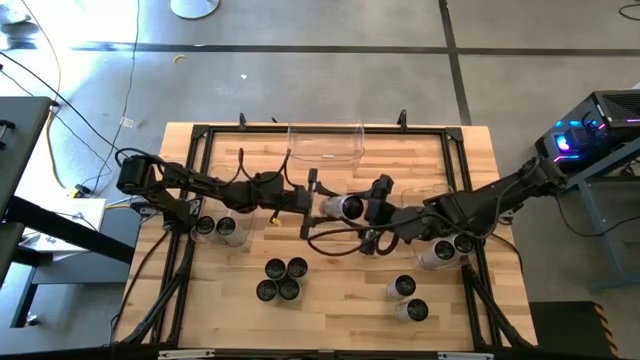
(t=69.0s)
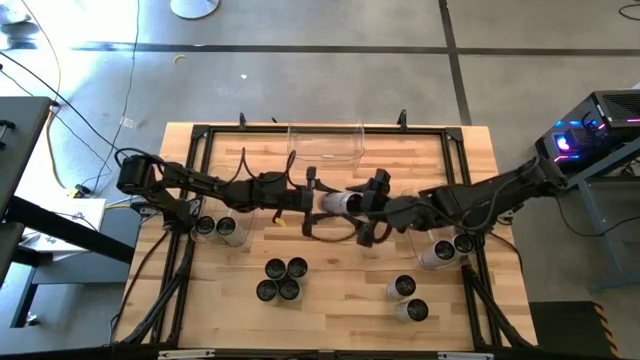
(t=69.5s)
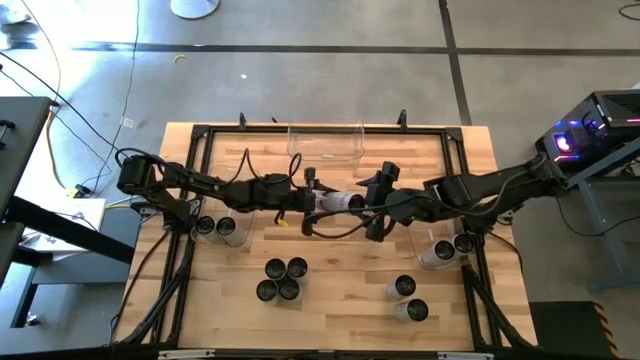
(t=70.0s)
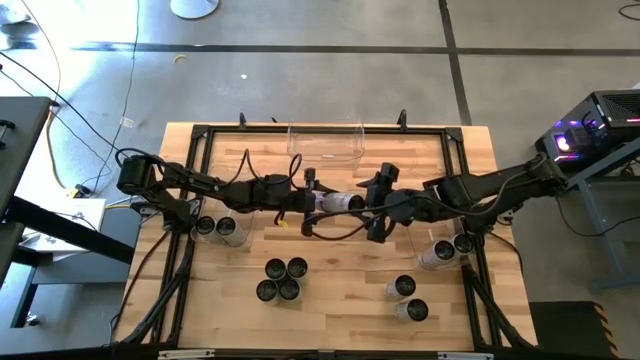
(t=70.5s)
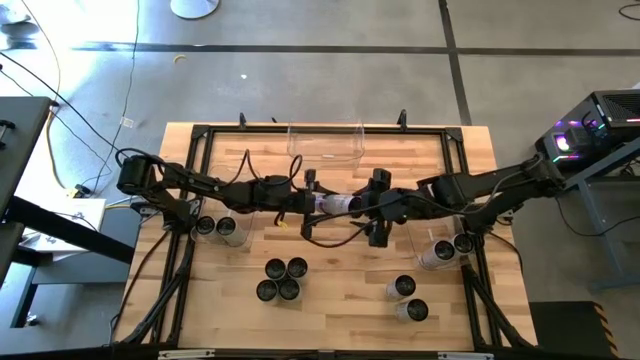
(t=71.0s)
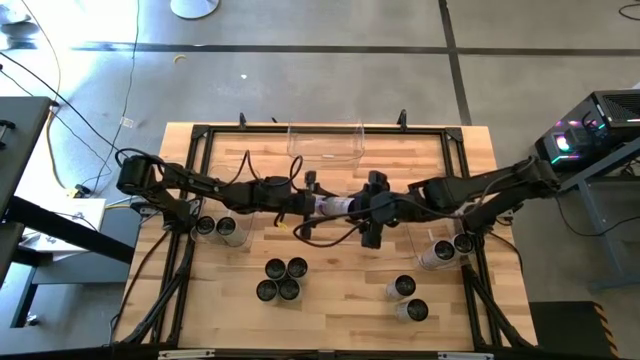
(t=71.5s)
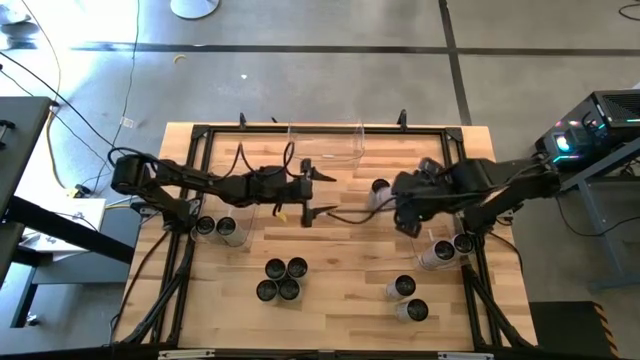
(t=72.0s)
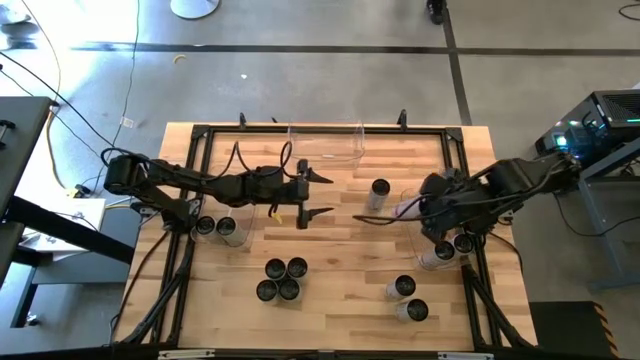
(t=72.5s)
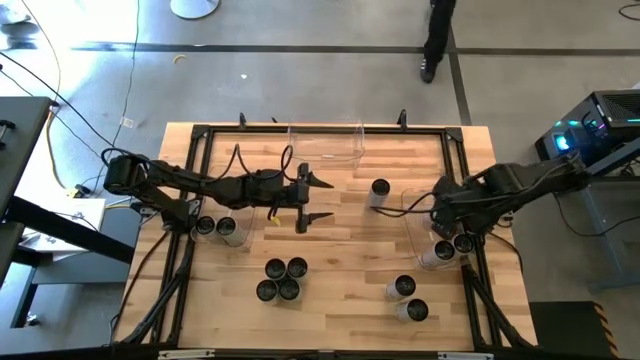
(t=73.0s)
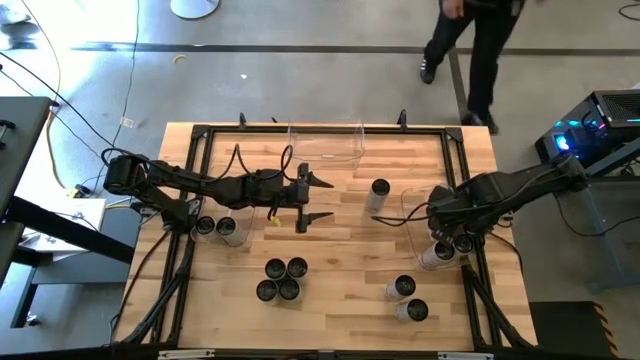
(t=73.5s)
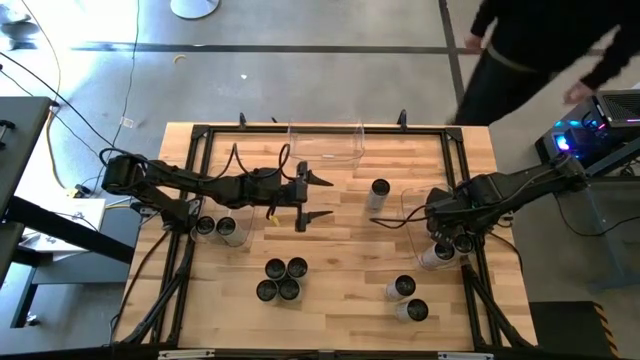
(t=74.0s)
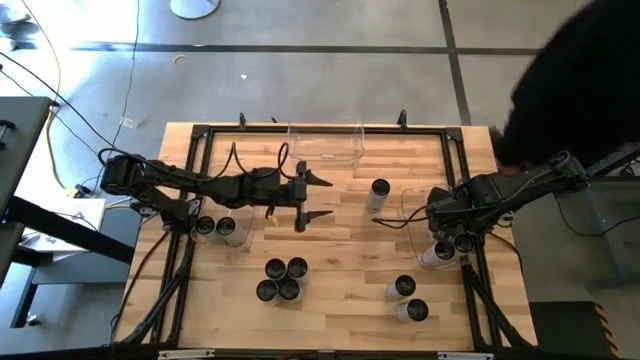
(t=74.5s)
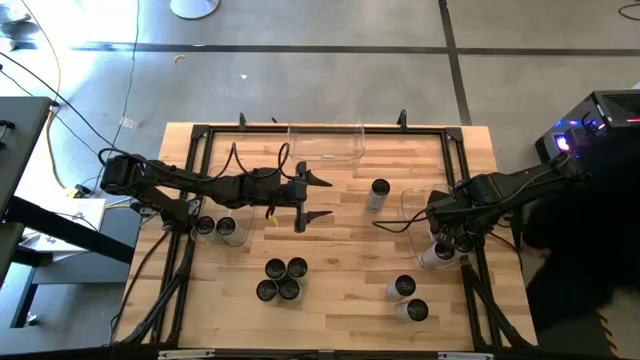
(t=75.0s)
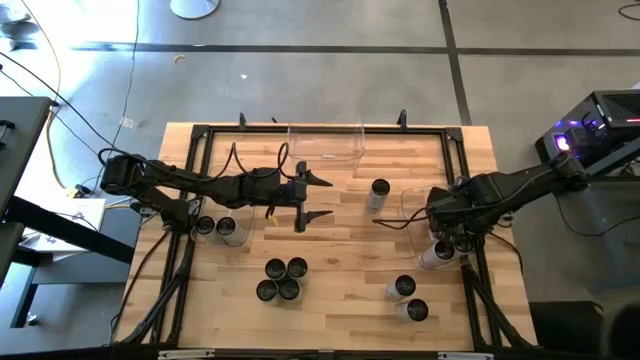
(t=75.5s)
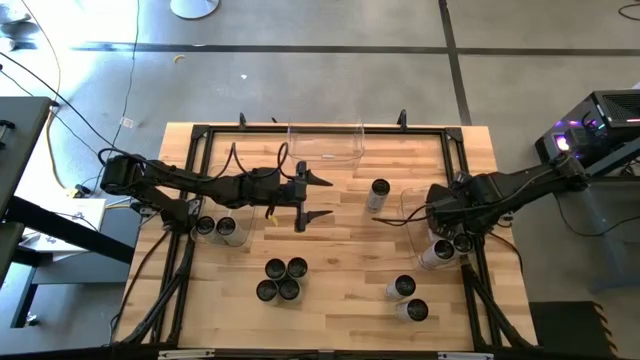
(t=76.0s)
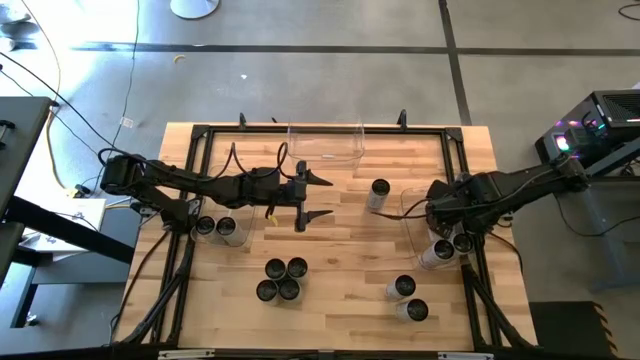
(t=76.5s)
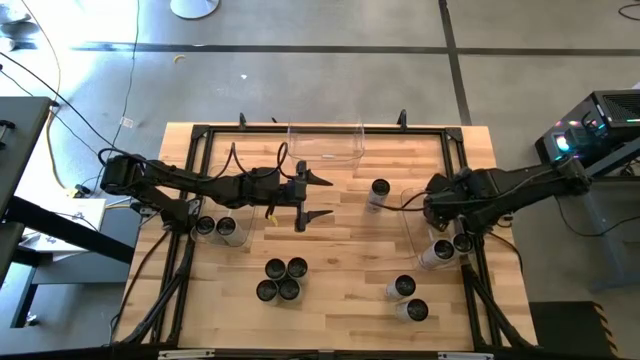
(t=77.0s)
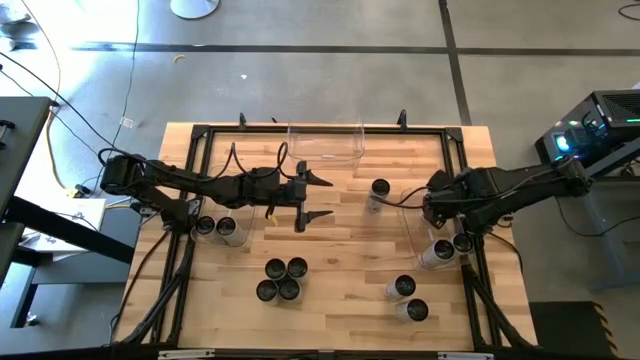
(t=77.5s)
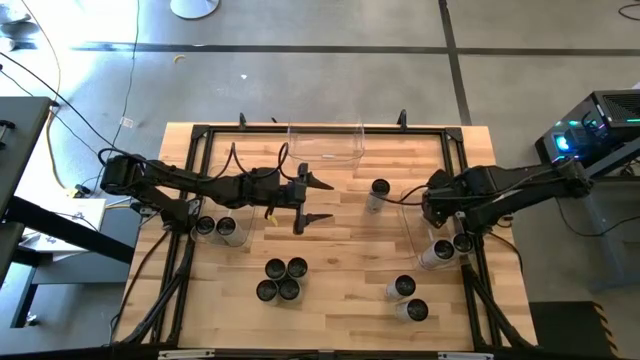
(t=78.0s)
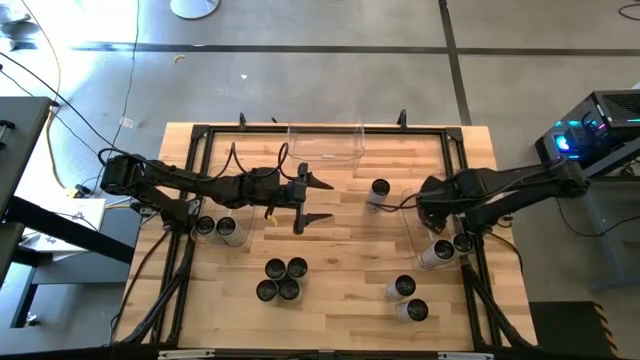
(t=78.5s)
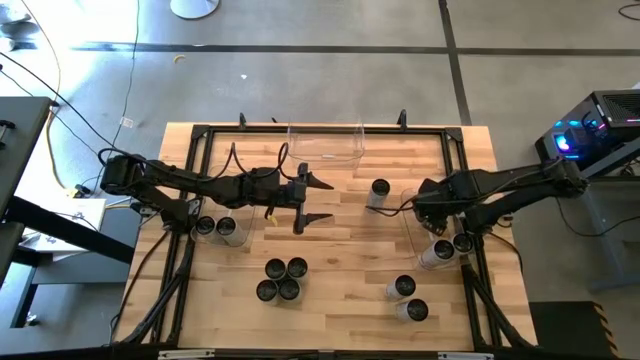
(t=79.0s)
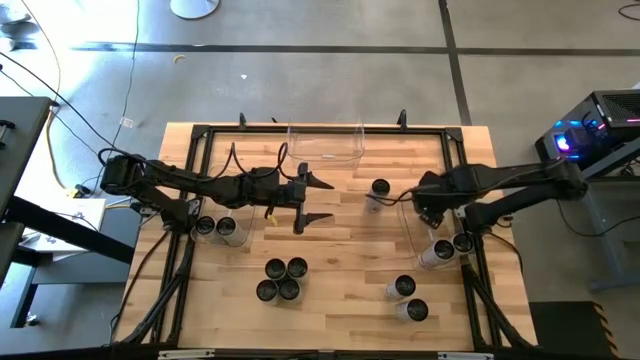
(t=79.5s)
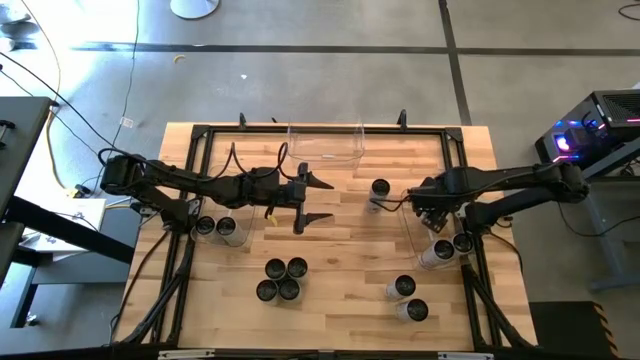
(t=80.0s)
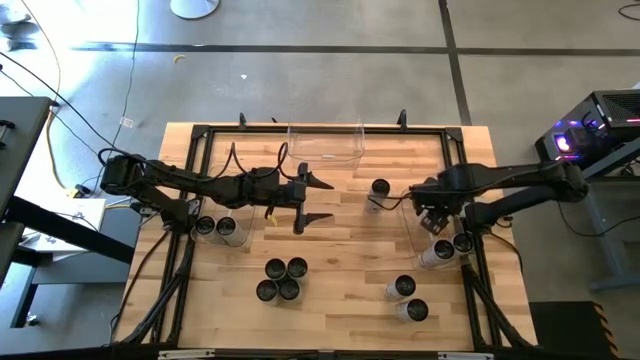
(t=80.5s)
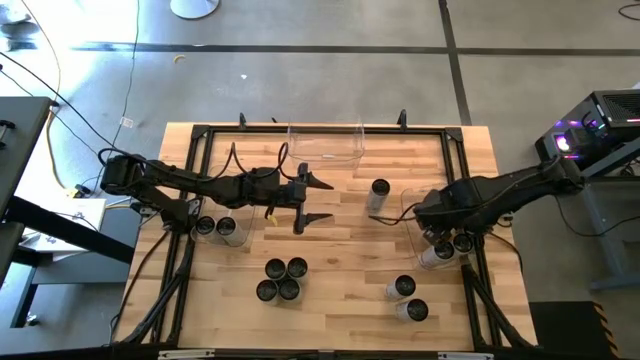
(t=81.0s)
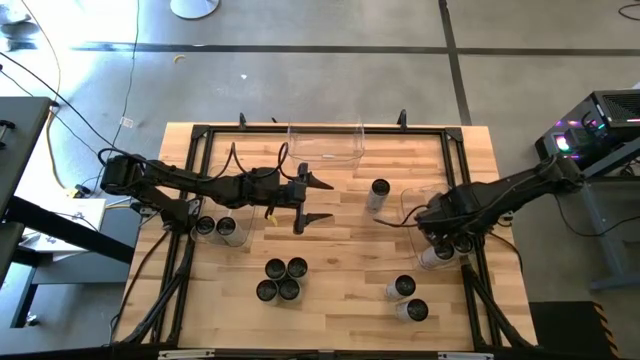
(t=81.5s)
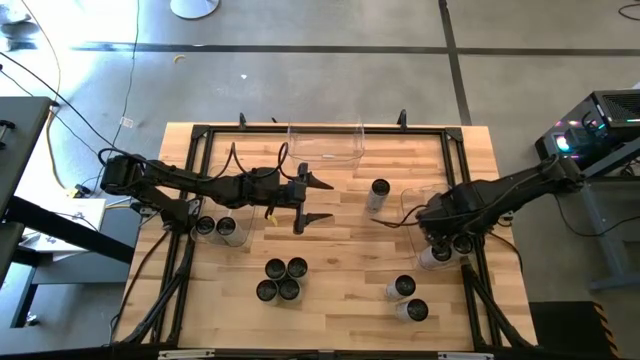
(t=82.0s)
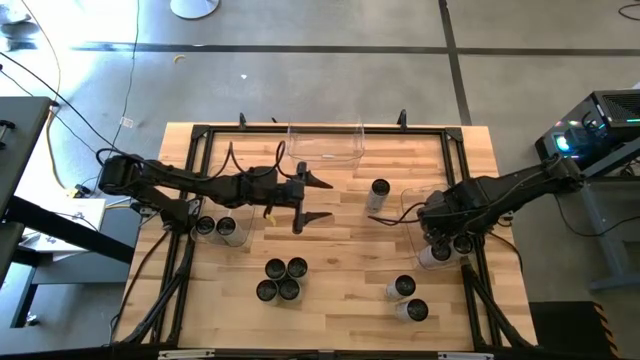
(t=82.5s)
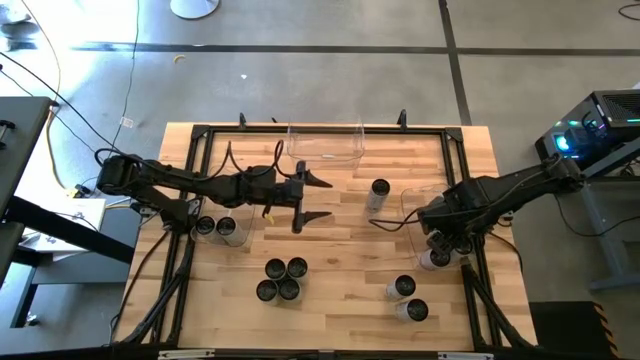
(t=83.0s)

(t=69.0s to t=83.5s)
Task: Sort soda cans
Put the white-pink soda can into the right transparent bin

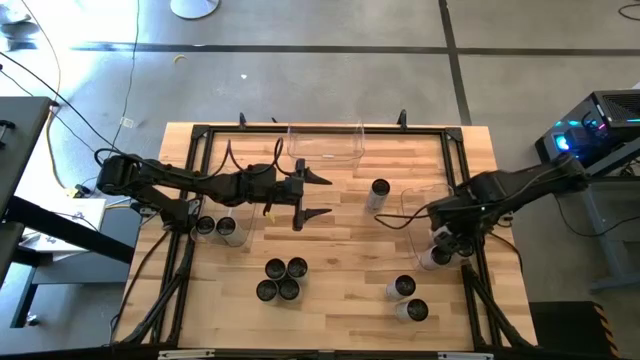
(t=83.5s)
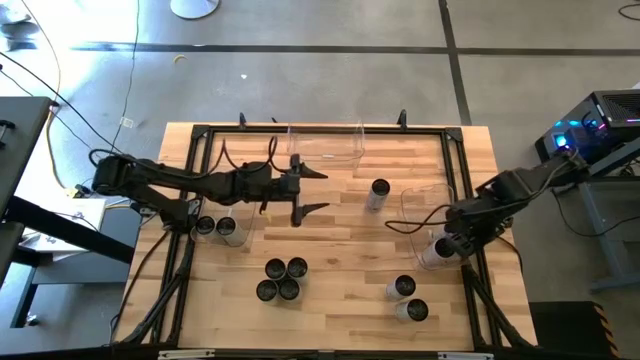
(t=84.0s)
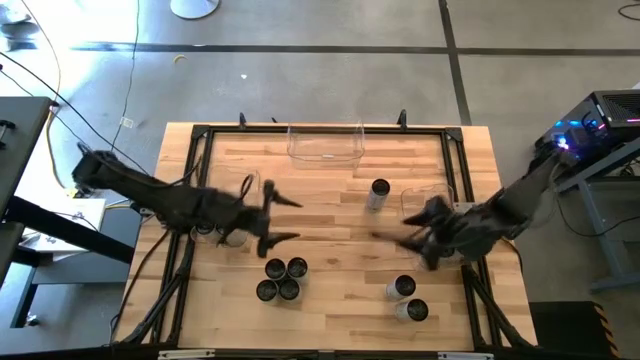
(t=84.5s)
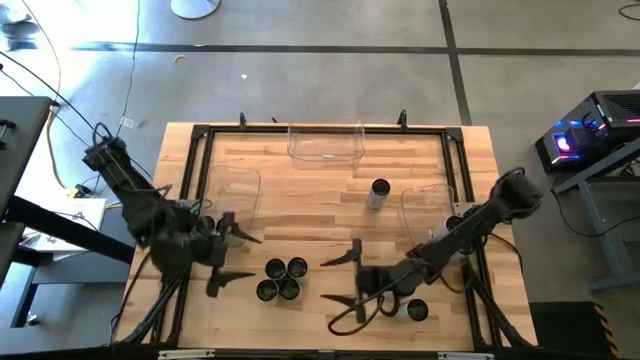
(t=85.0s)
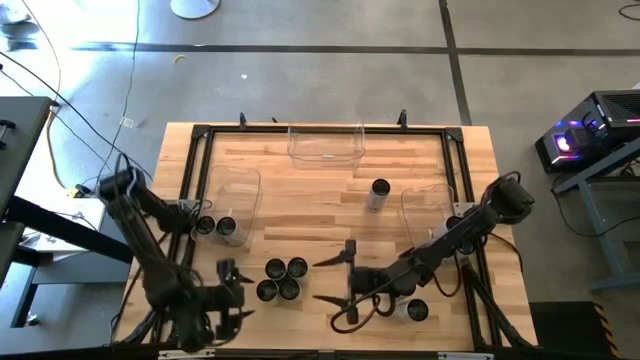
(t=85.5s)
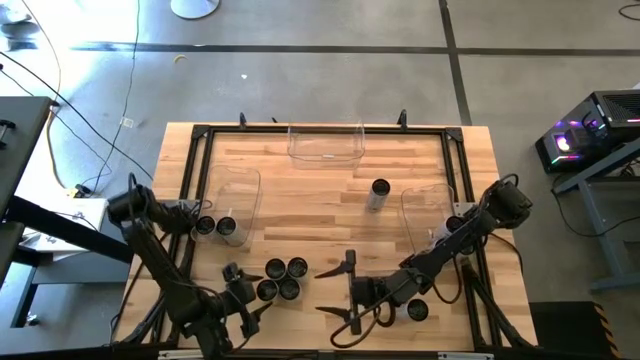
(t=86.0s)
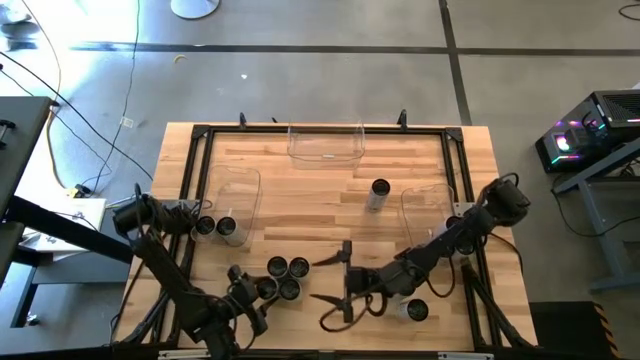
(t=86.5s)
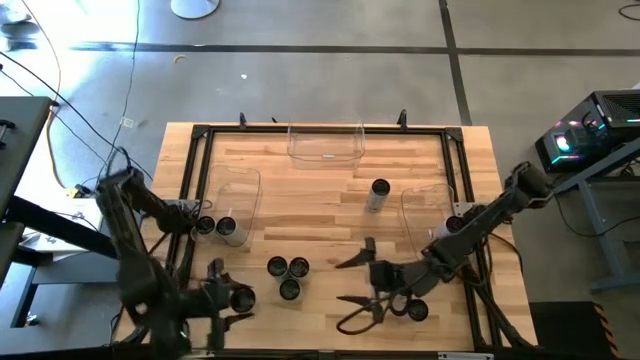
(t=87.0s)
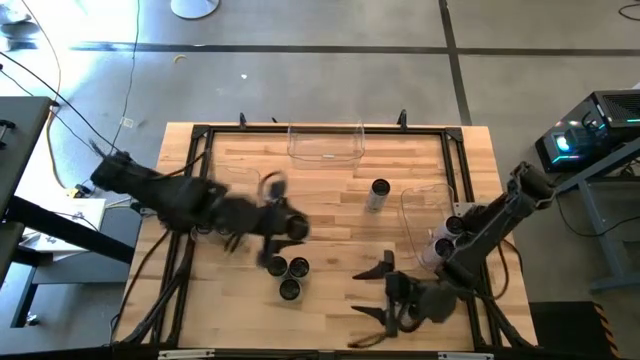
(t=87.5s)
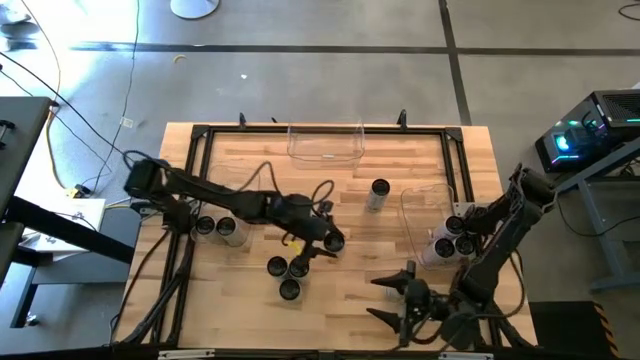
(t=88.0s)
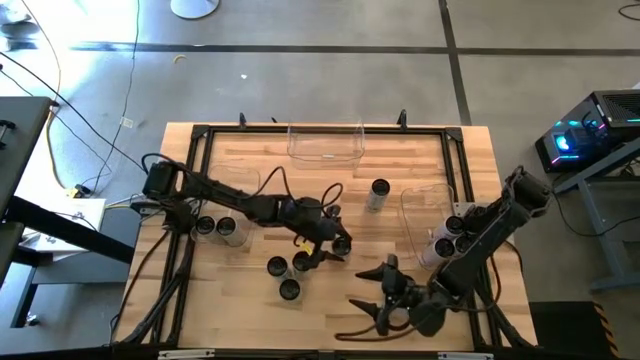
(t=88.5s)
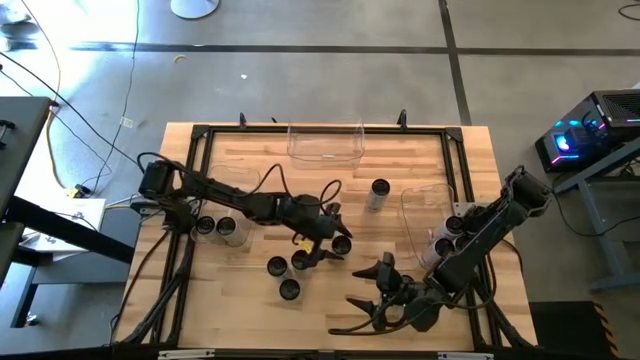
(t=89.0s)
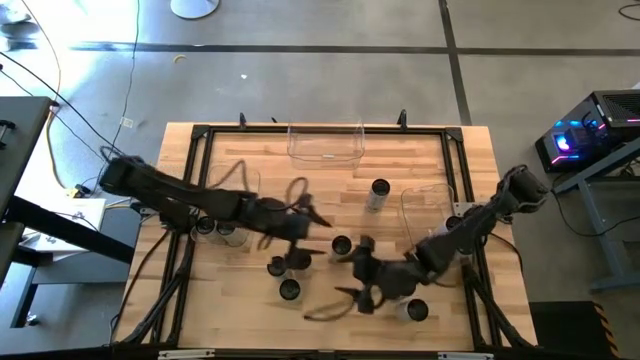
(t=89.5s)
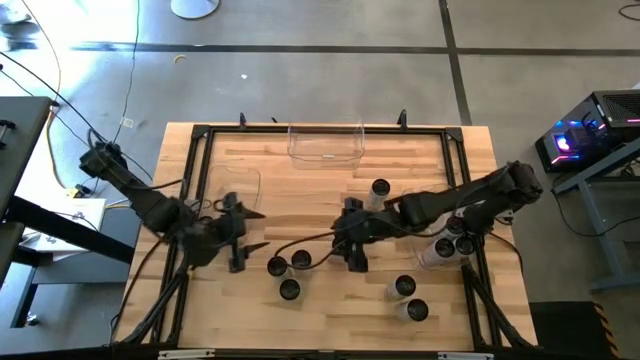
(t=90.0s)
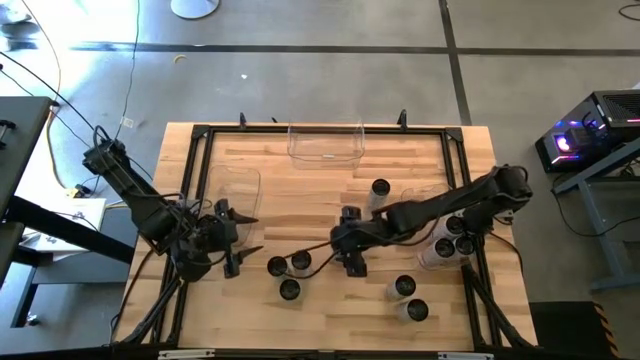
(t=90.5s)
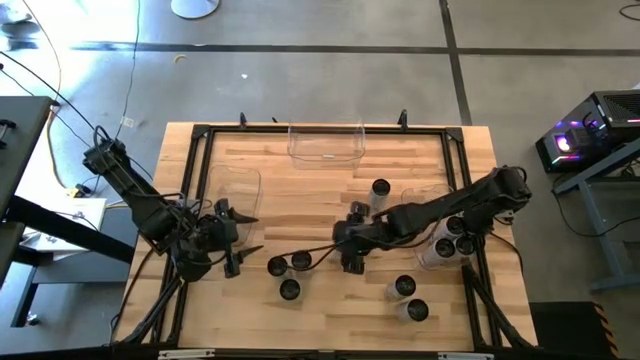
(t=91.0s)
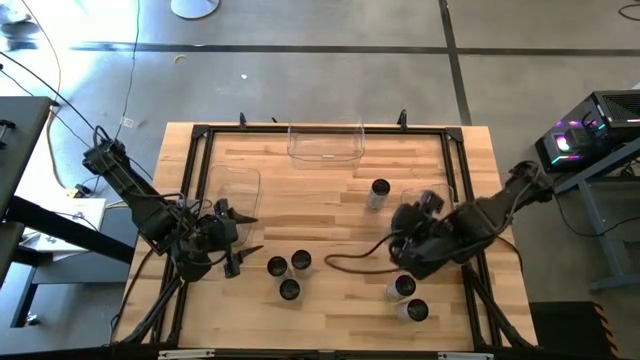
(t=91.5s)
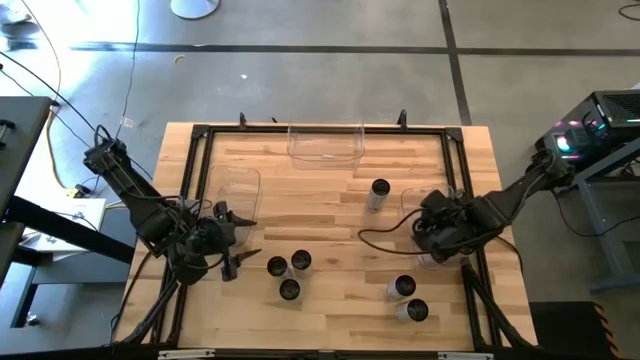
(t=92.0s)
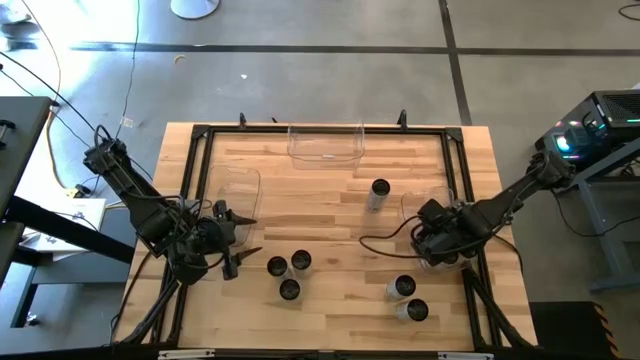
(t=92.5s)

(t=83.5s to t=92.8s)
Put the white-pink soda can into the right transparent bin
